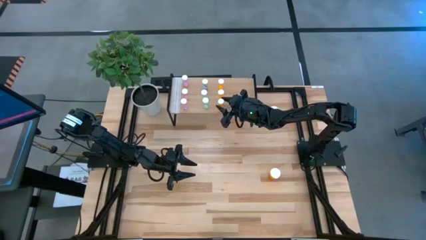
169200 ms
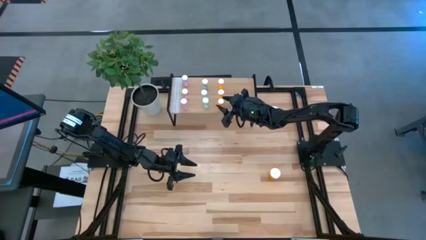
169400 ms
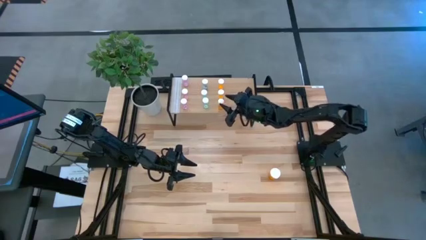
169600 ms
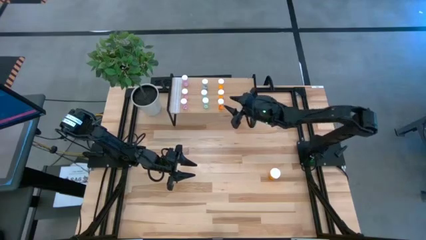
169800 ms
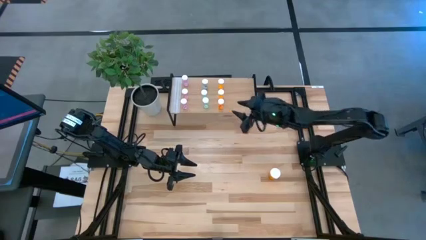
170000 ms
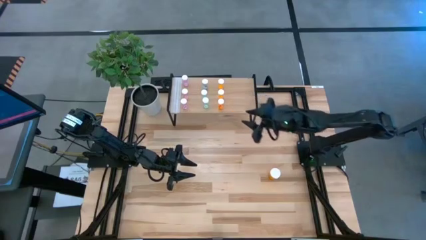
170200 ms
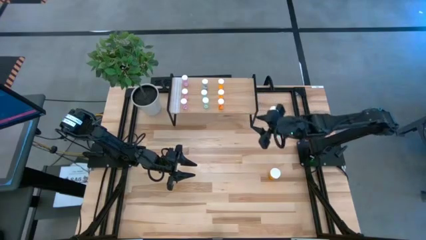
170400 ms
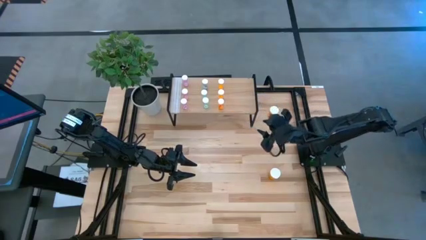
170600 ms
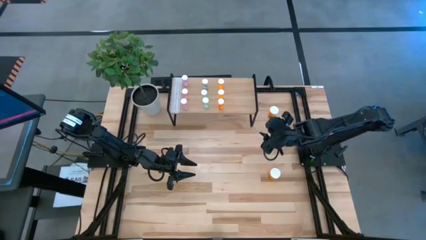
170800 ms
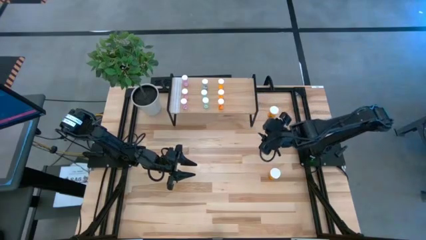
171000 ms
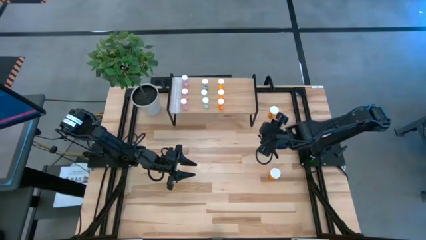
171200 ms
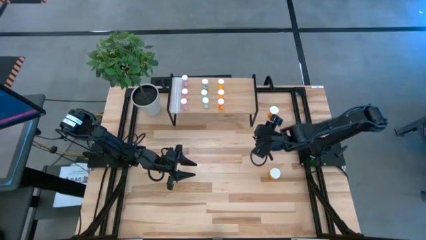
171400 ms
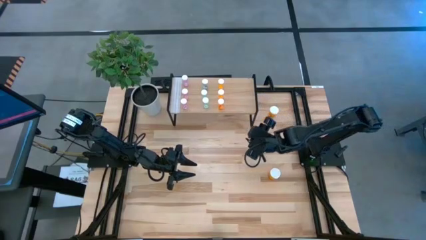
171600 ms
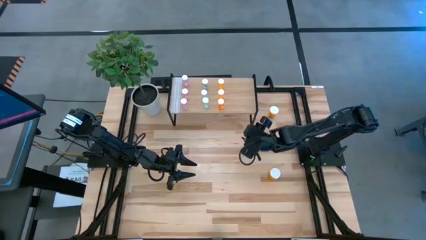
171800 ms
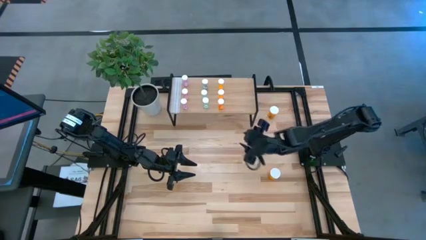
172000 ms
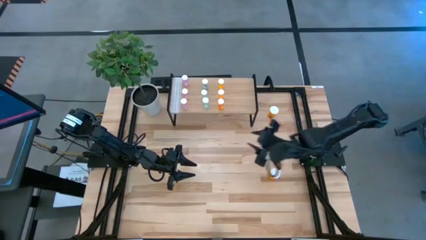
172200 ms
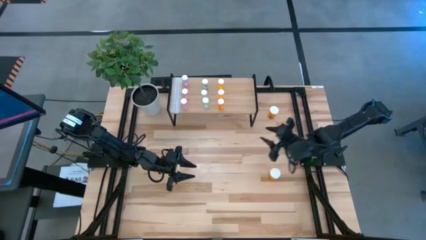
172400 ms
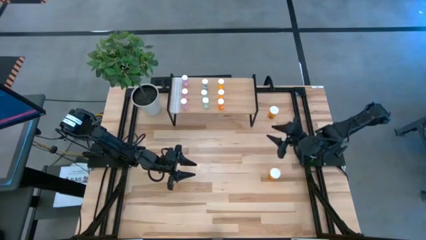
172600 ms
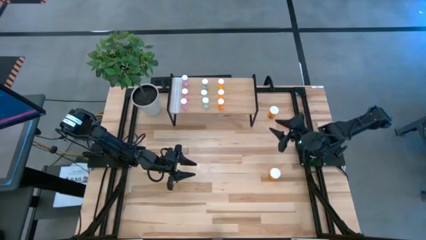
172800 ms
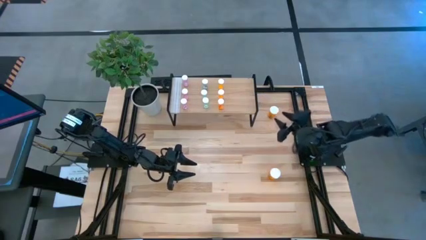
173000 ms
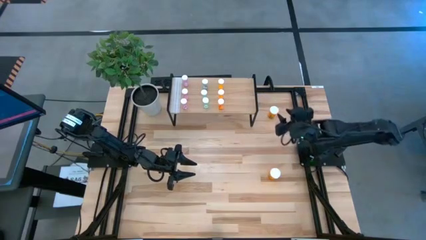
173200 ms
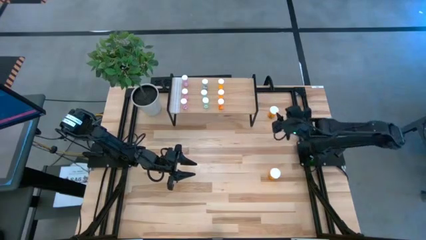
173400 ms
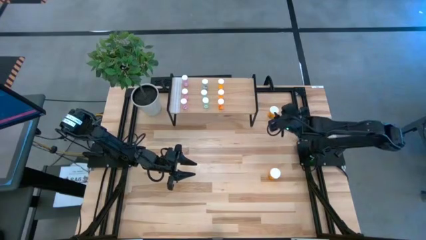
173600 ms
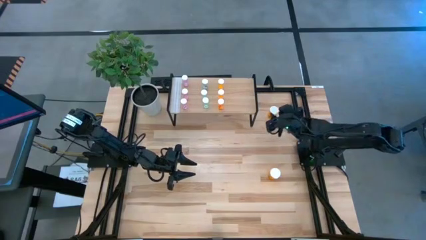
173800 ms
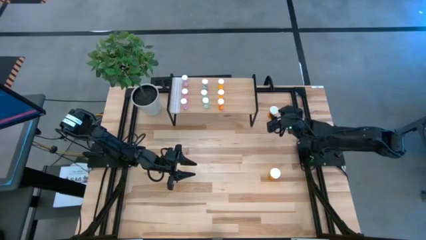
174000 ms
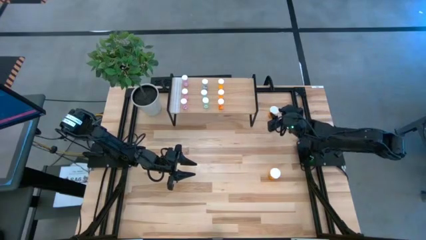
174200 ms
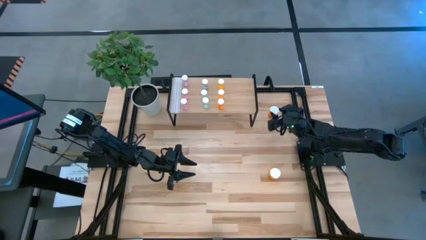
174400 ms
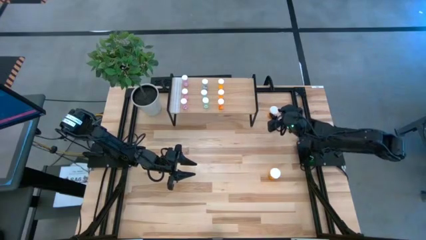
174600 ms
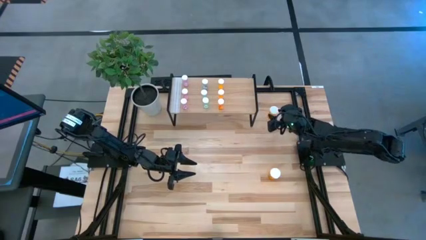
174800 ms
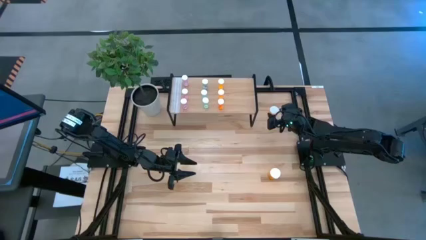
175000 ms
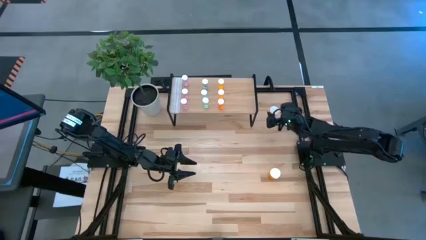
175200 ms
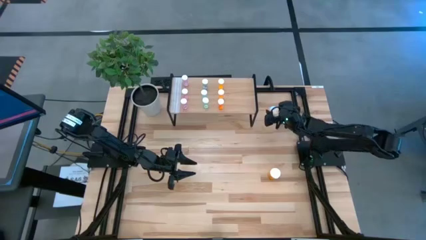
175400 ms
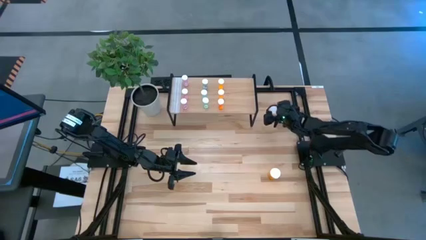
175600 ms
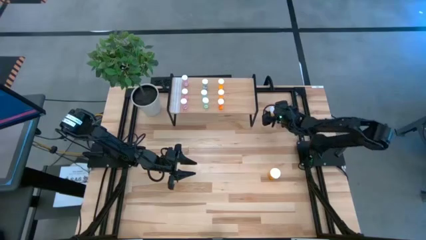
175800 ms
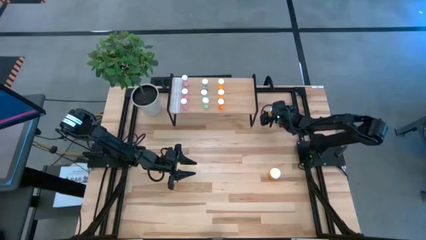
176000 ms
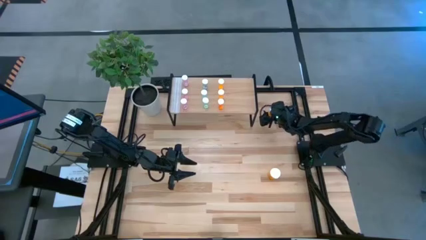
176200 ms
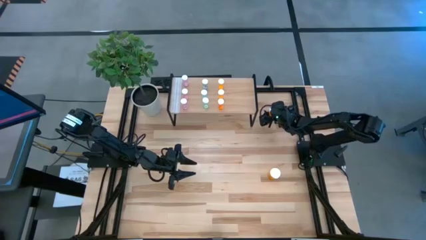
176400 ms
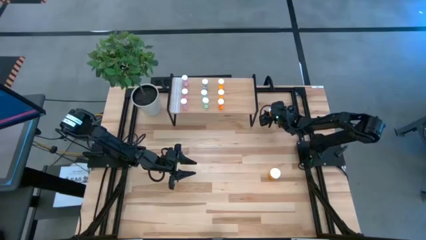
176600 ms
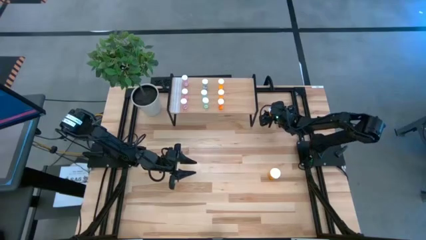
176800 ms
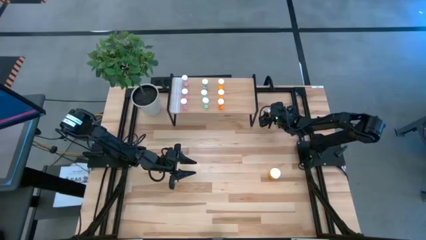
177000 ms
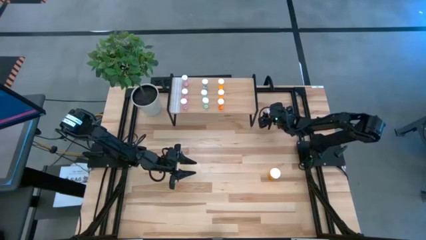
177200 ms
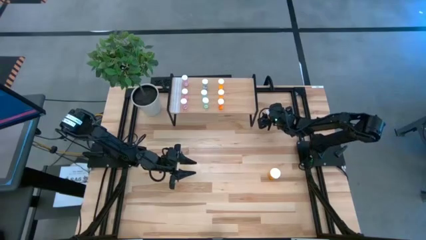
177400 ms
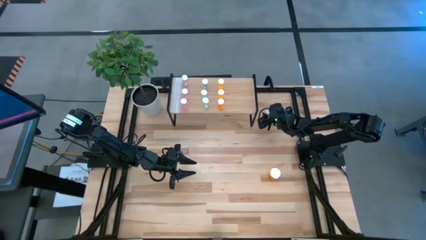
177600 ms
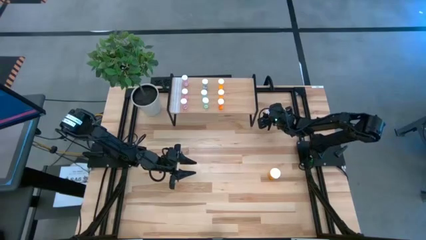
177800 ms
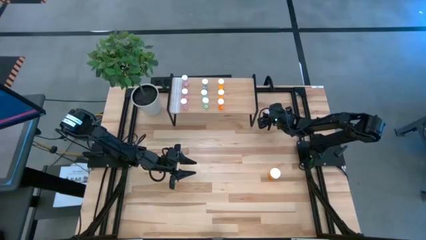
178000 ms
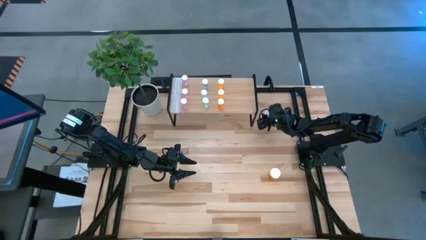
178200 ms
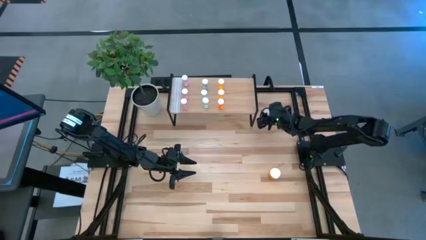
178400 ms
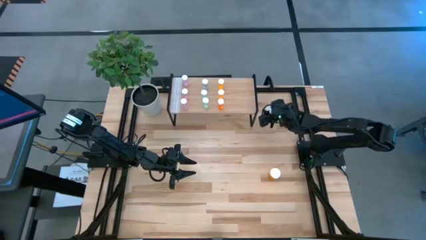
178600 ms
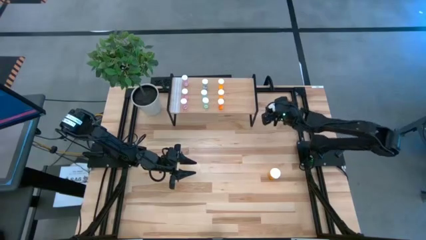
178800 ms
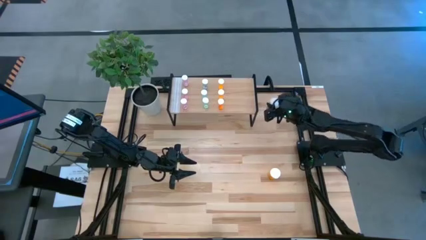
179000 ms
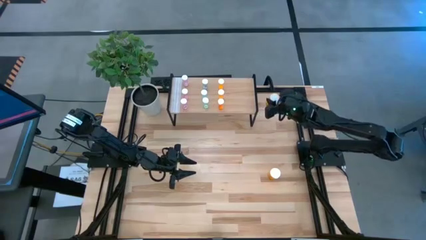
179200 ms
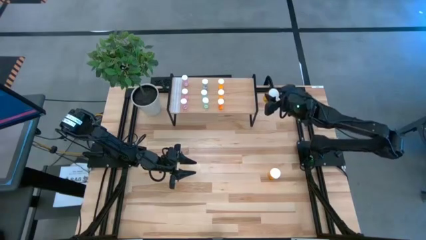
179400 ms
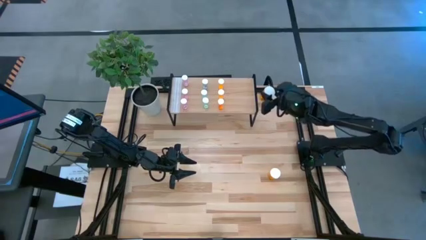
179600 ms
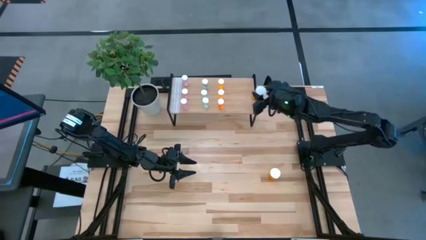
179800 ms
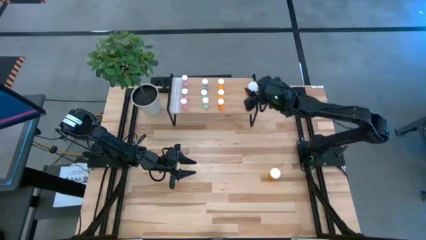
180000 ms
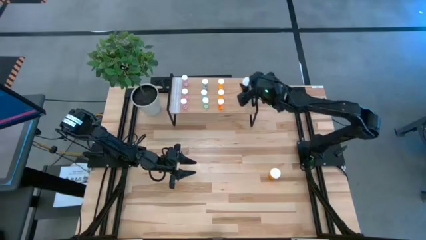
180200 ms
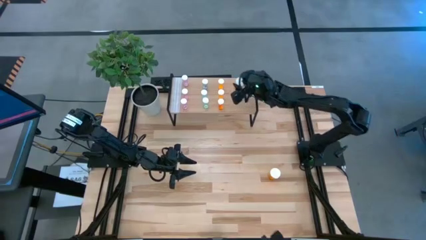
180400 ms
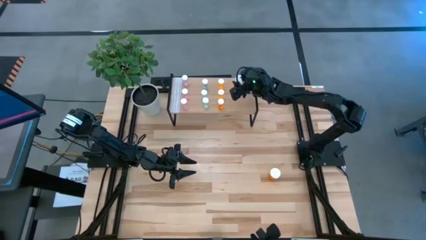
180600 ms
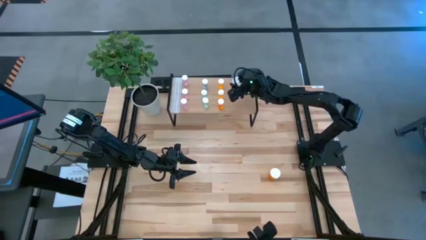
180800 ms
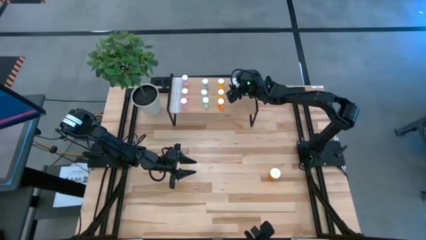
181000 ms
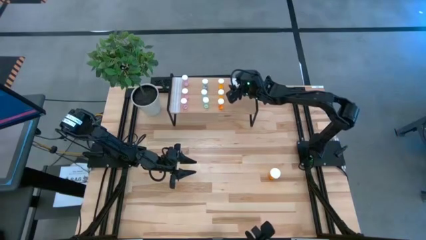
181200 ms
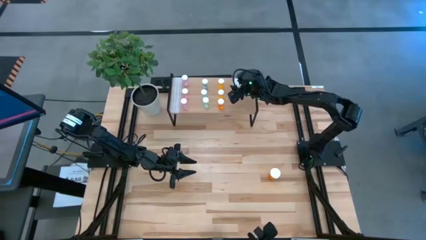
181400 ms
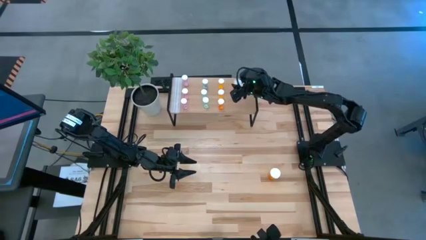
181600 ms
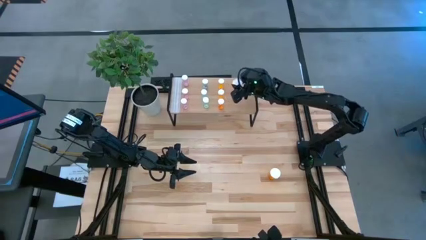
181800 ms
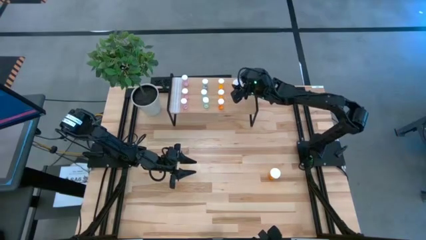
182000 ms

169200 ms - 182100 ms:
Task: Pick and place medicine bottles onto shelf by color
Put the top big orange pill bottle on the shelf
